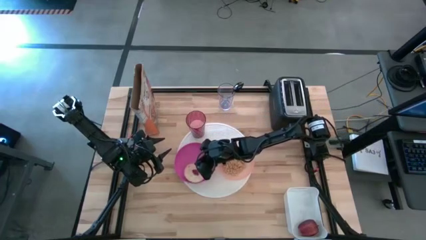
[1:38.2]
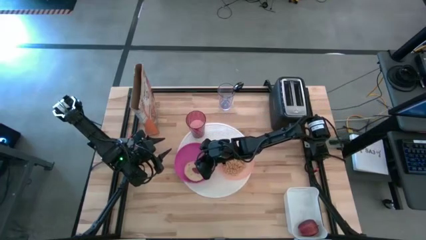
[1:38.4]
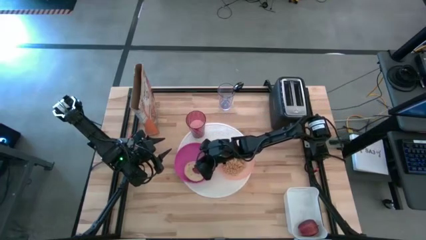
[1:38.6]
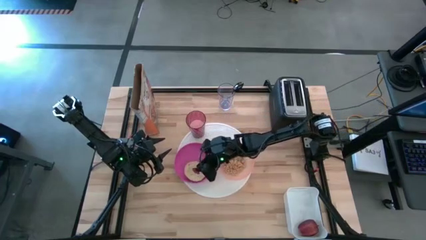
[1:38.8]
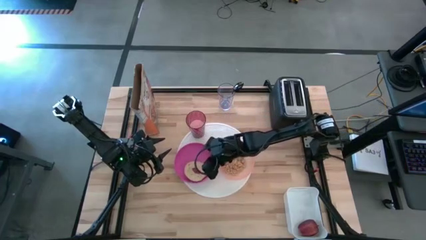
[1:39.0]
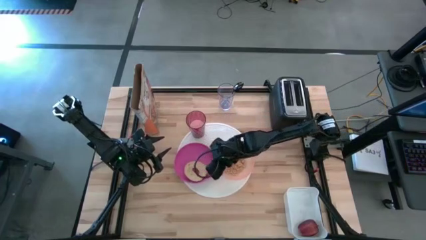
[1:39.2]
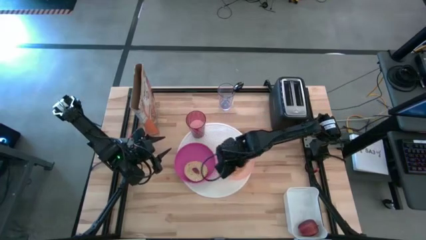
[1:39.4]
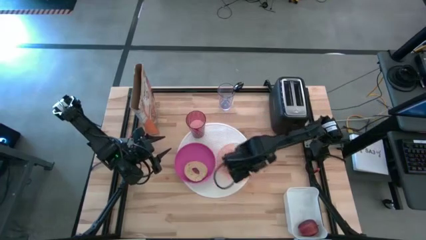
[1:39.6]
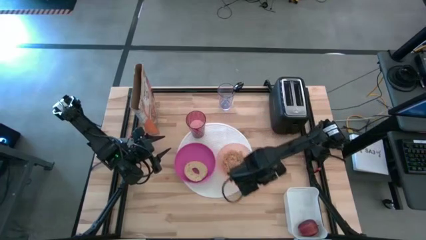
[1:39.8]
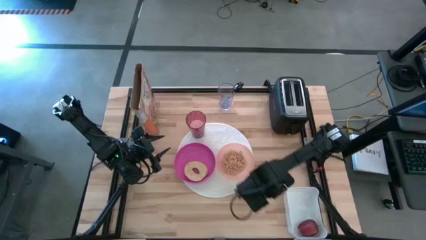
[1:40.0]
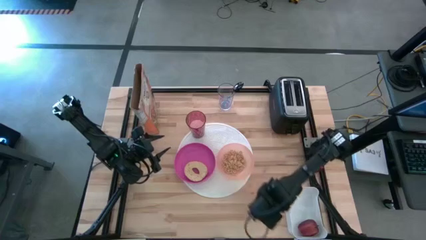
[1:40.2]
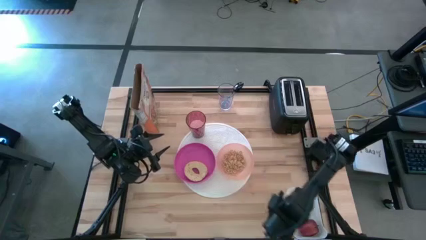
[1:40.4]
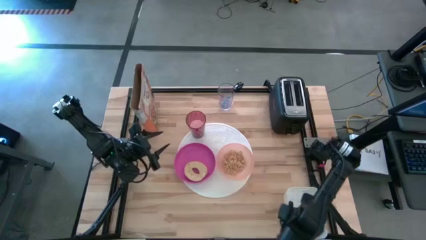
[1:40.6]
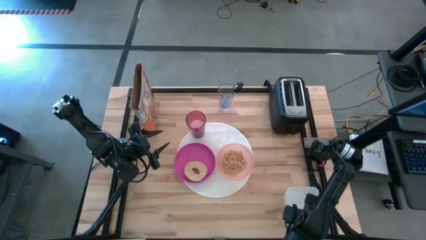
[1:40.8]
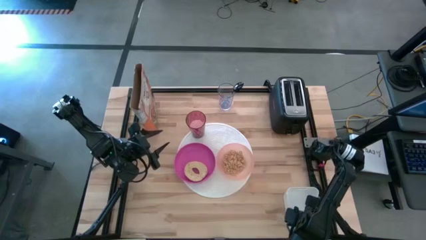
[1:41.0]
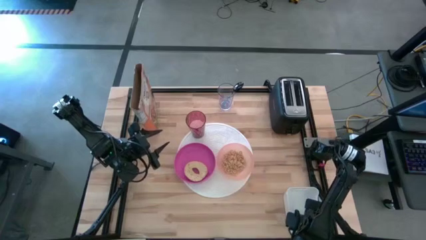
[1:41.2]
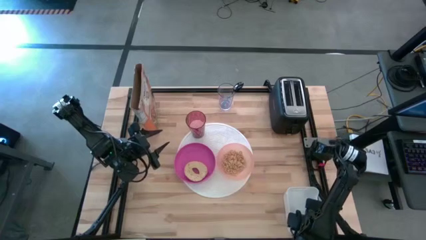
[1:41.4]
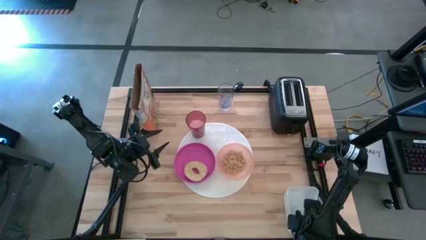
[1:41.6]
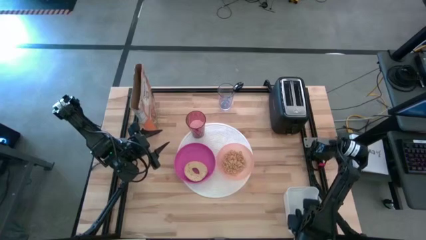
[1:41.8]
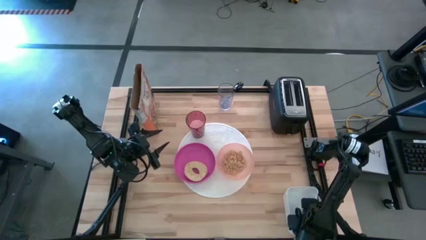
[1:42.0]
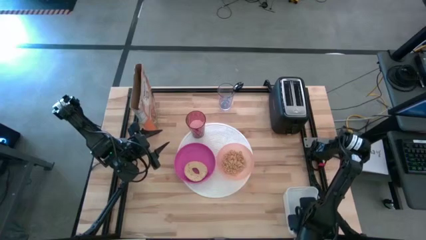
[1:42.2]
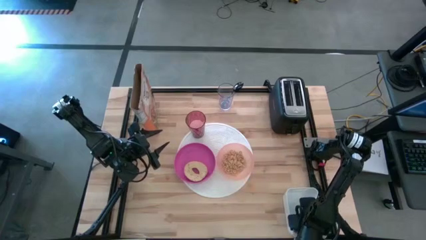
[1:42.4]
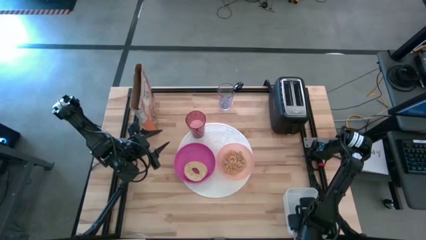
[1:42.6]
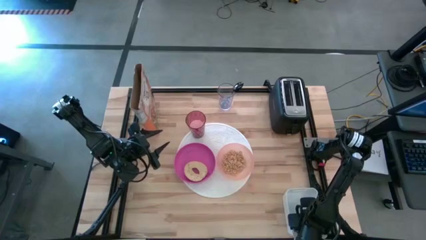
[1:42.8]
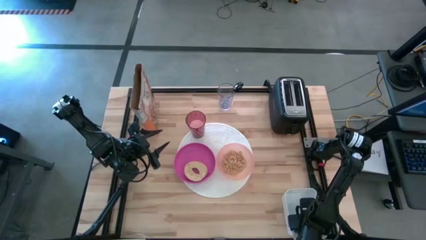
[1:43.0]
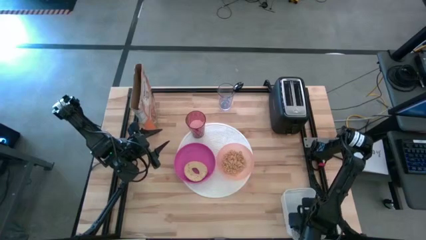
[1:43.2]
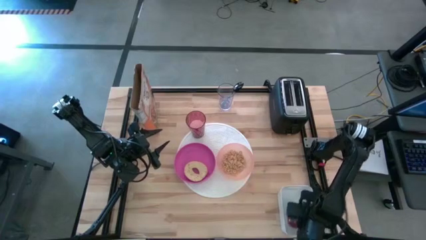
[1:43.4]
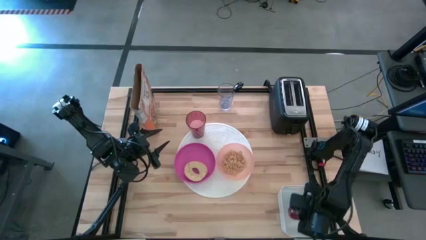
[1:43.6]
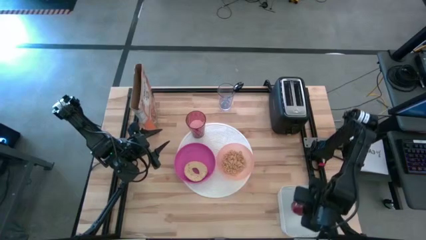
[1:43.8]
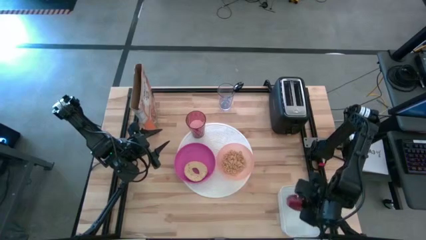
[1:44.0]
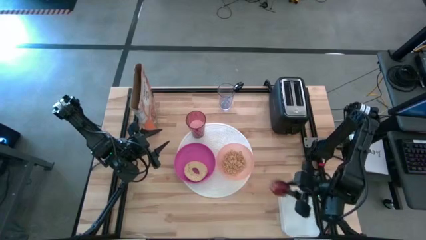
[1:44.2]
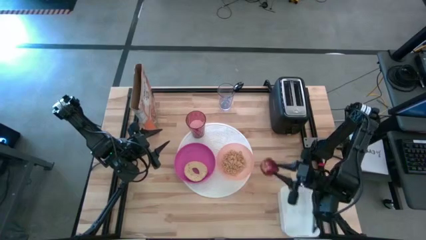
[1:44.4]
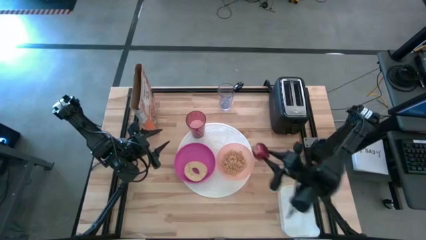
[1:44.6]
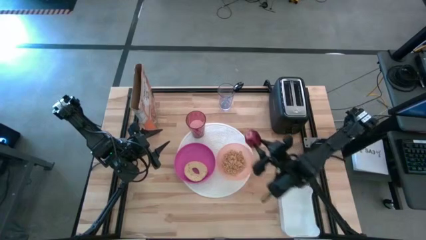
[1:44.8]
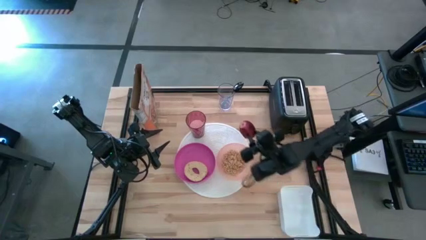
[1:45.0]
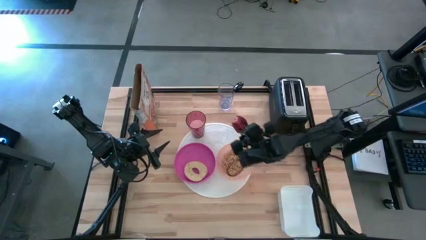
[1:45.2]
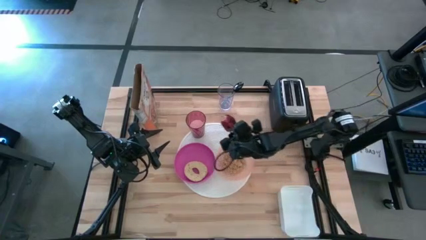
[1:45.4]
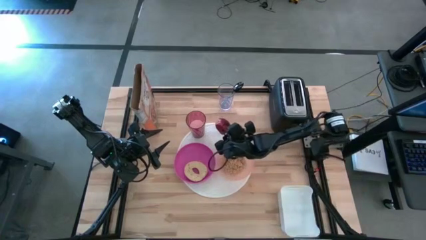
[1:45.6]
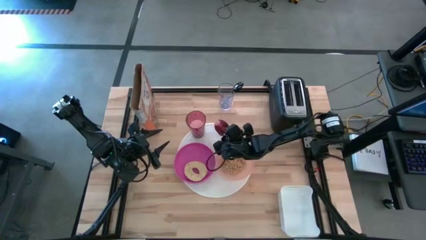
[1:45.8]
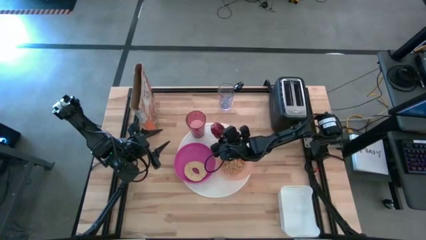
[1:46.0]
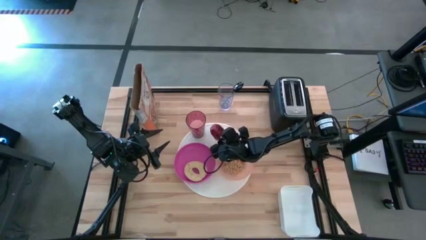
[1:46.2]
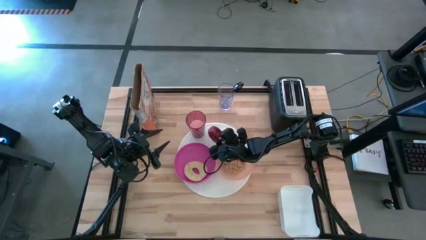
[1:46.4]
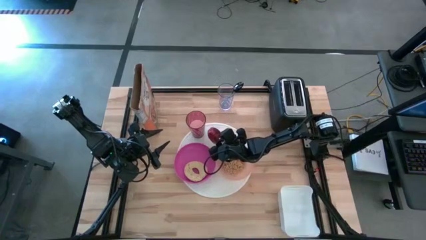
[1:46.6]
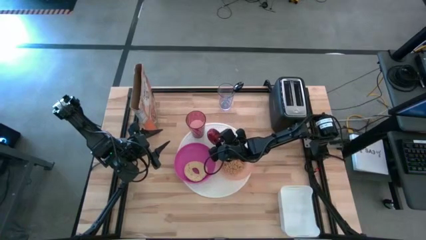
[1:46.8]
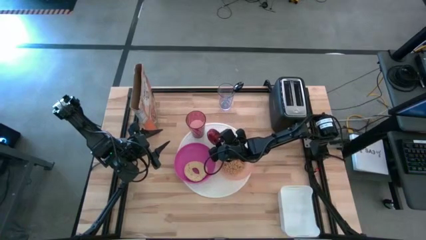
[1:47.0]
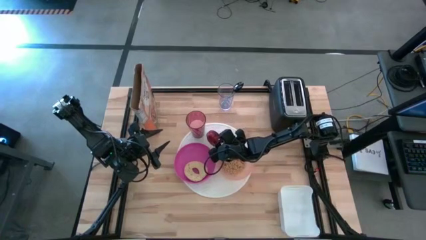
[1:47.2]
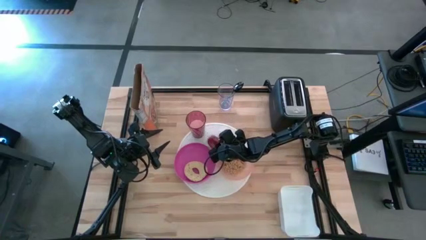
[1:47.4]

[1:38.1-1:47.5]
Task: Arrange a breakfast setting
Put the apple on the top side of the white mat

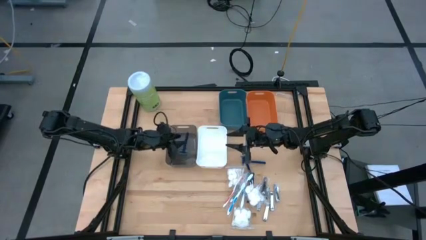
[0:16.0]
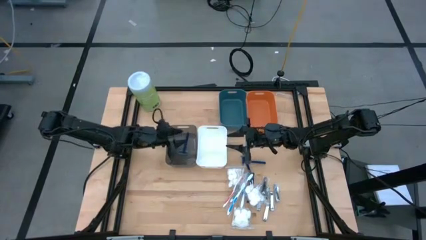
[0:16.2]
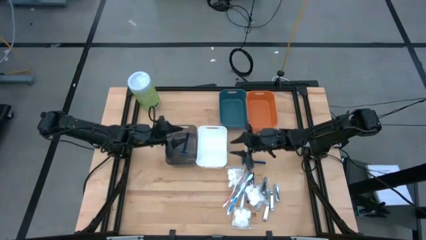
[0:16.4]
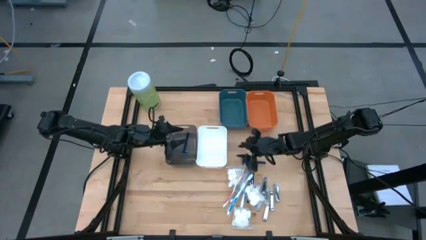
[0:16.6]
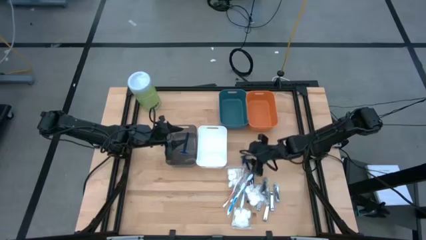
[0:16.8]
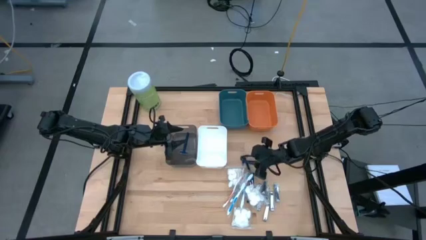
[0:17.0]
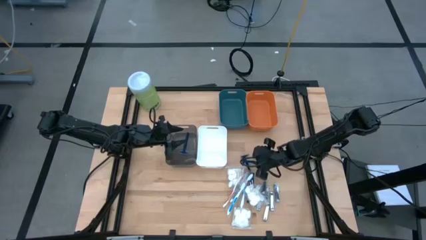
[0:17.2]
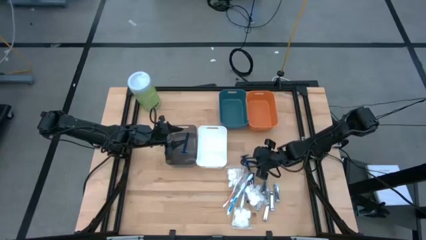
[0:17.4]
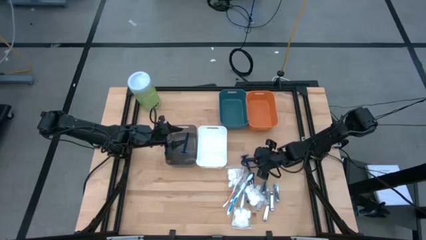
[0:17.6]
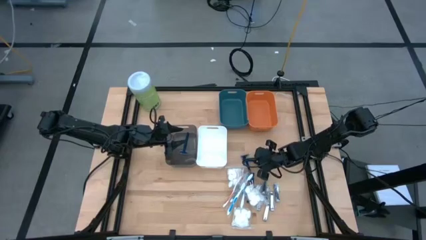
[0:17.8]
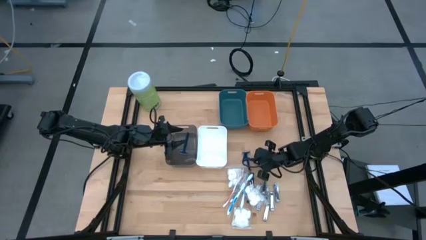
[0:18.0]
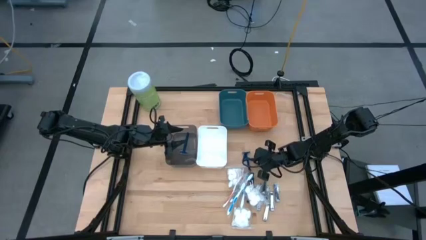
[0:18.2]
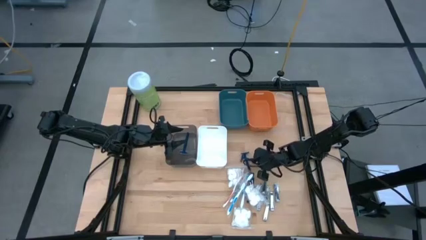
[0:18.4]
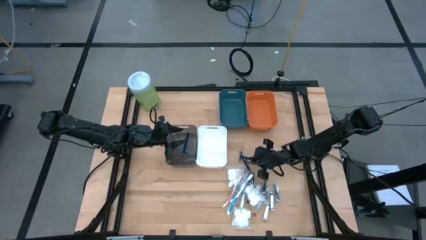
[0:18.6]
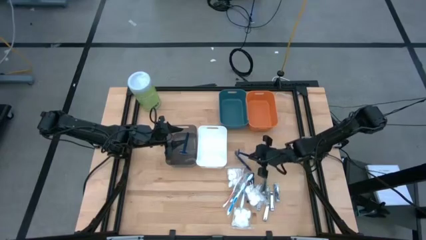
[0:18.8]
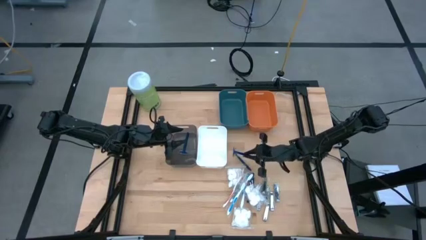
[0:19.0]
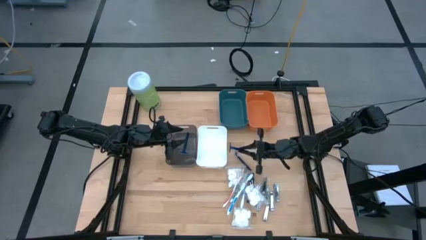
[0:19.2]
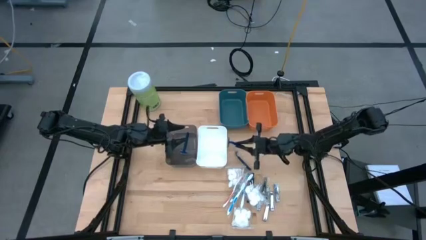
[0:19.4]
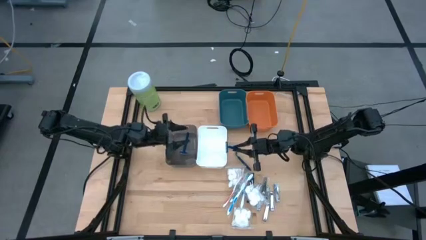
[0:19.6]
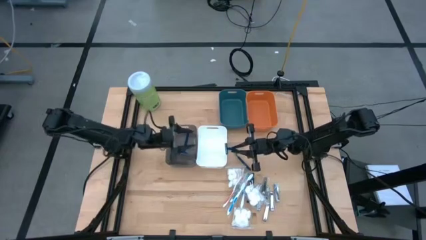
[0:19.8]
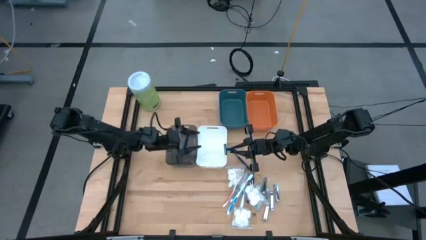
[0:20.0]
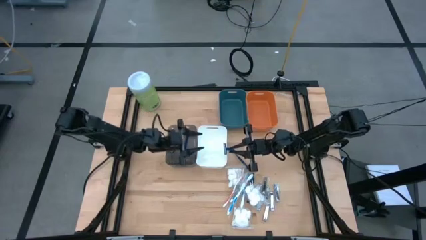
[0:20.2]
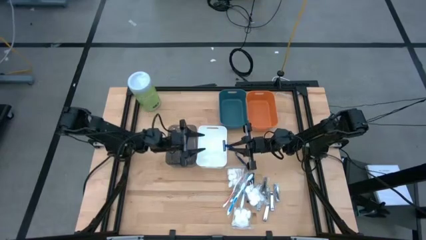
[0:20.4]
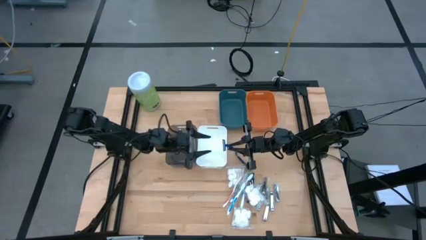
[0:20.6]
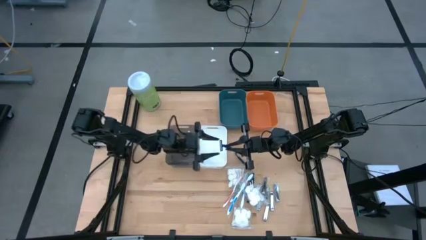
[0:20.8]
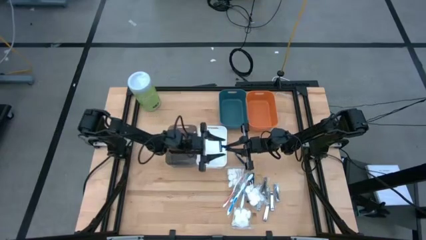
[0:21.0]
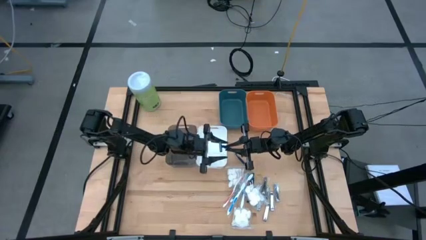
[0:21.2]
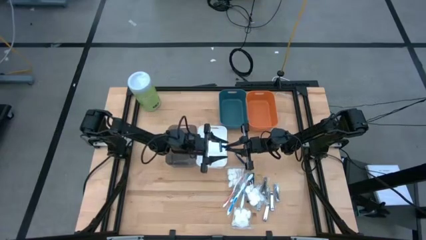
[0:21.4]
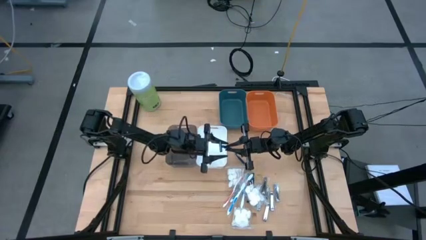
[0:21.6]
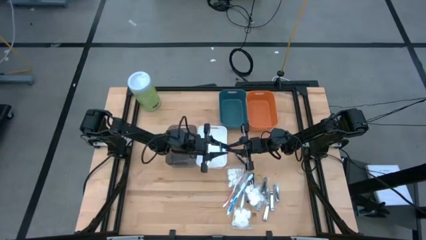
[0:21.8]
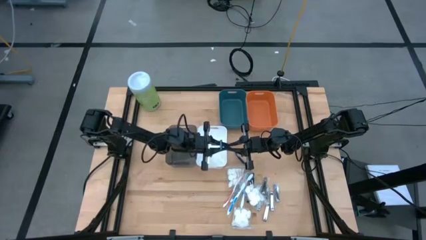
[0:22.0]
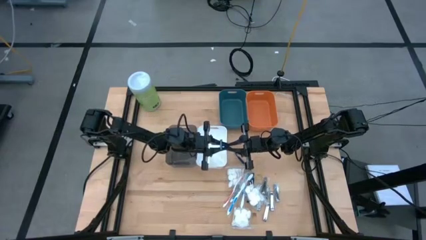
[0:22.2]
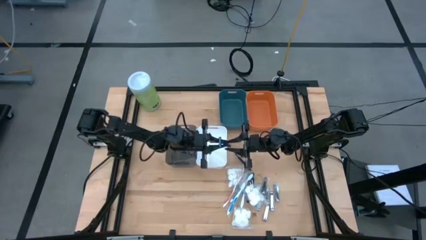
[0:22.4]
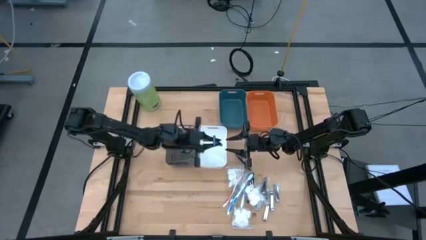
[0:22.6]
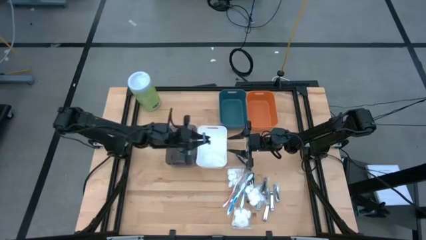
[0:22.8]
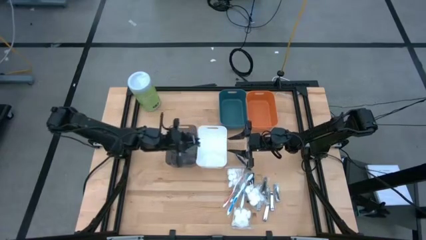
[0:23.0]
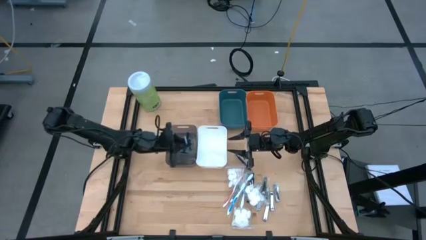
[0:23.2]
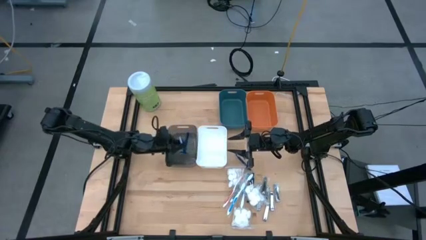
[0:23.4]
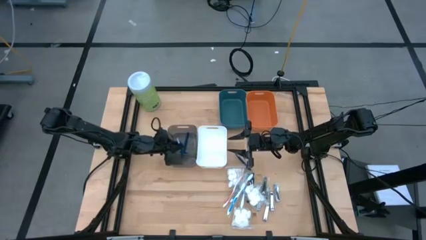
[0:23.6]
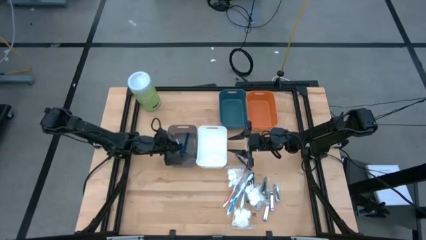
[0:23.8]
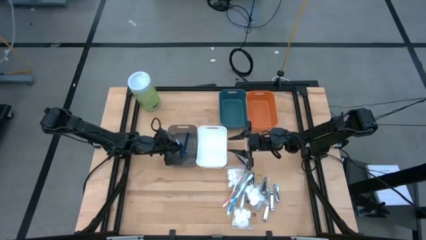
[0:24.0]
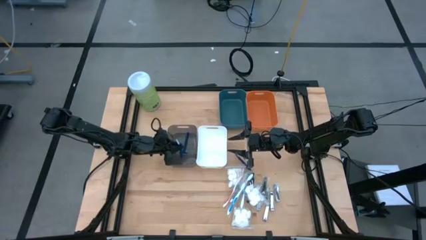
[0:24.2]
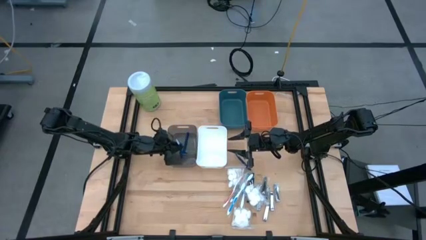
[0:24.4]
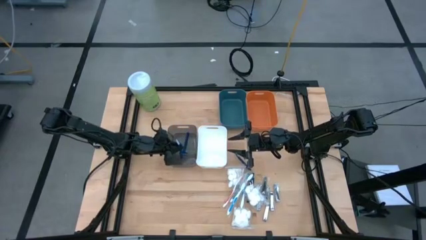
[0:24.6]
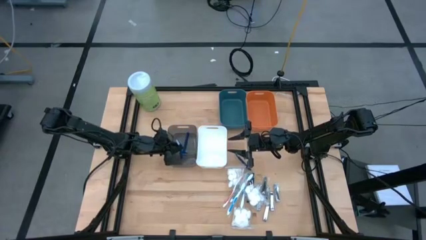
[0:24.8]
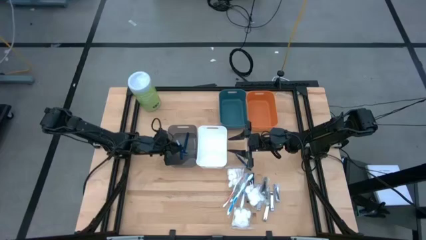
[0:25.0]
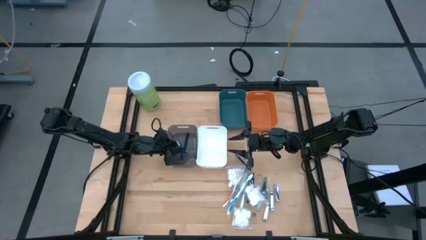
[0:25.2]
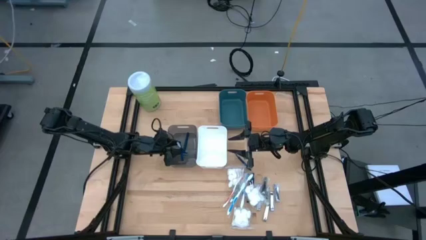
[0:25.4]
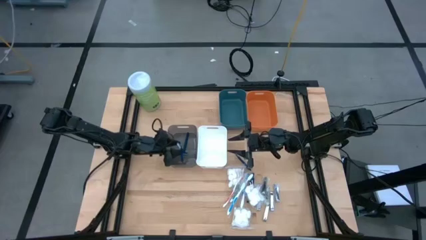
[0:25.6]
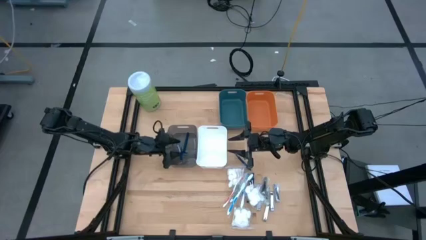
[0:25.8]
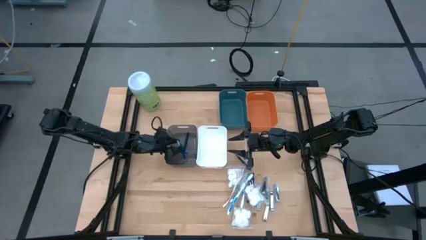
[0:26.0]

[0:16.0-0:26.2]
Task: Pick & Place Travel size toiletries
Put the blue razor into the black bin
